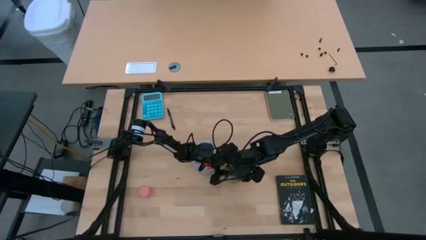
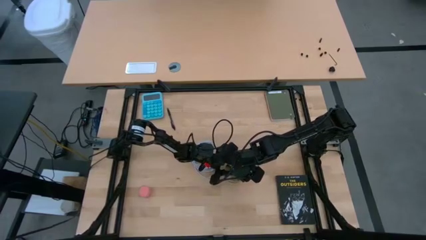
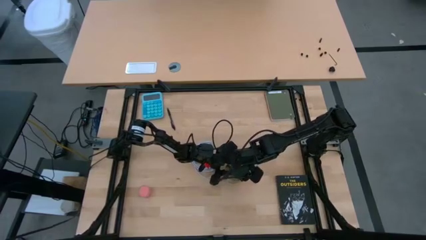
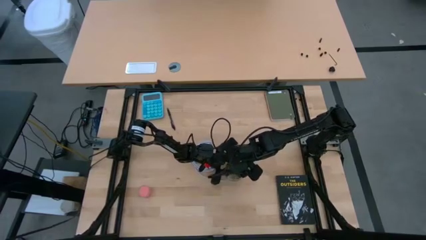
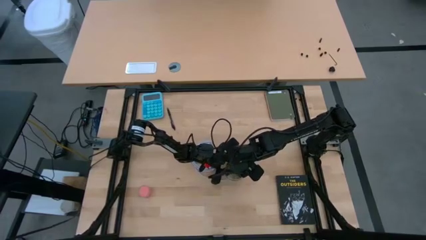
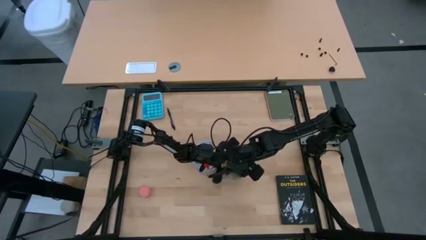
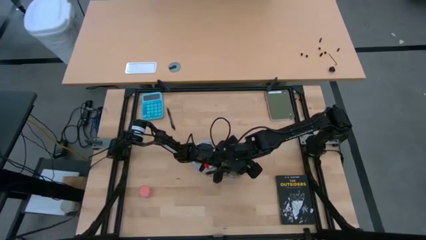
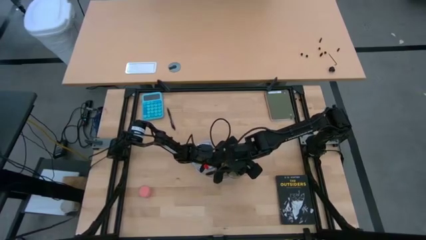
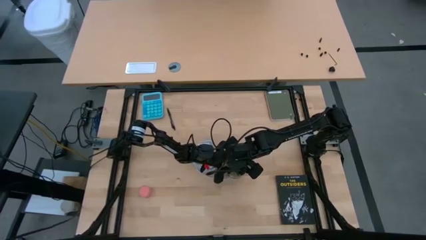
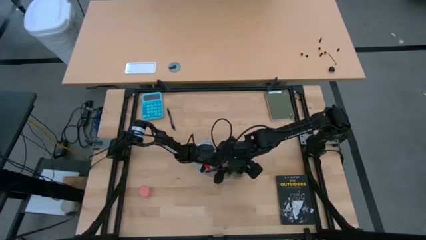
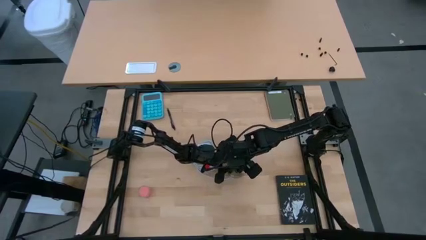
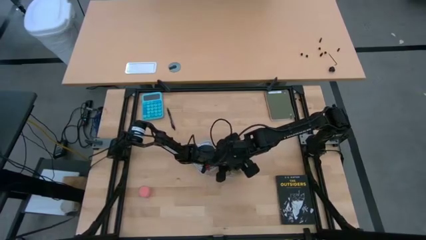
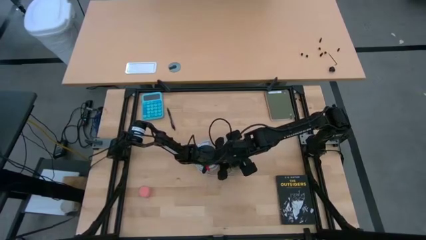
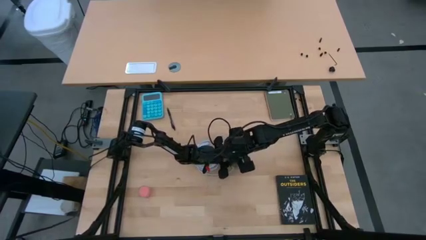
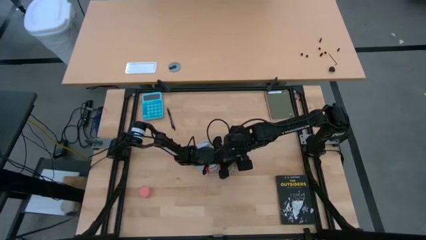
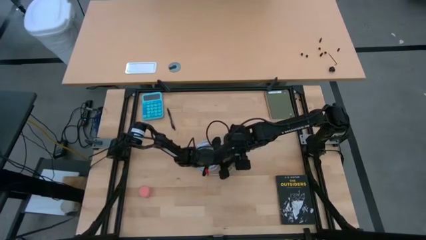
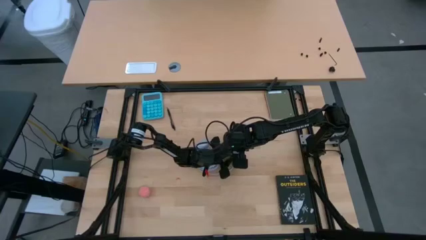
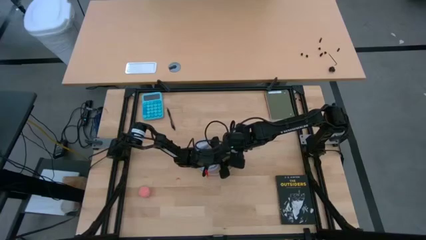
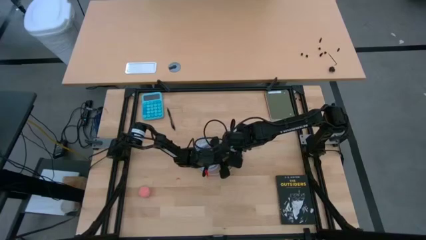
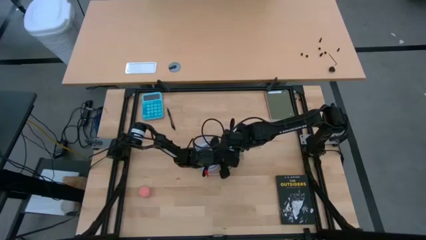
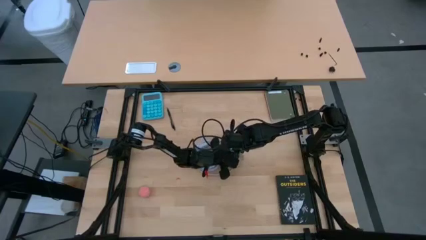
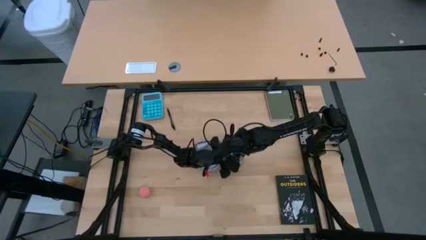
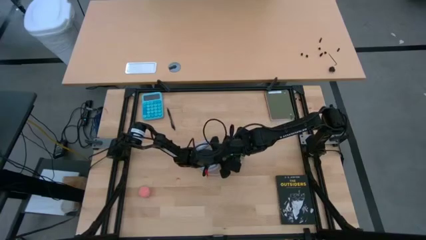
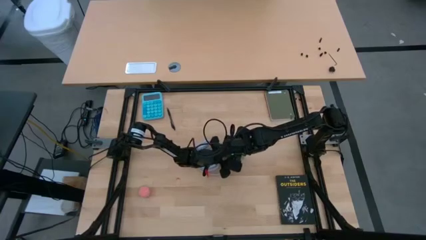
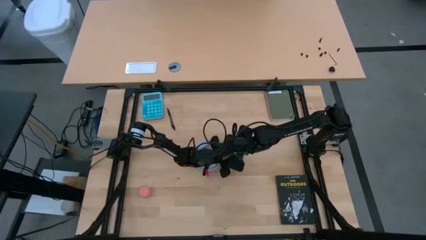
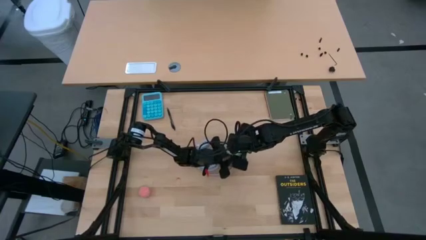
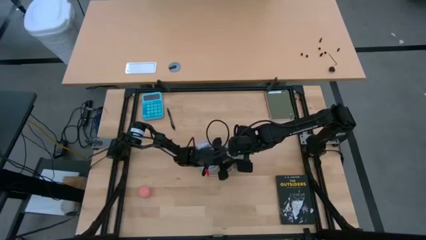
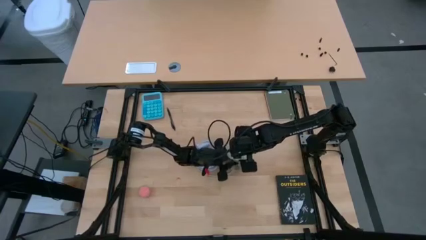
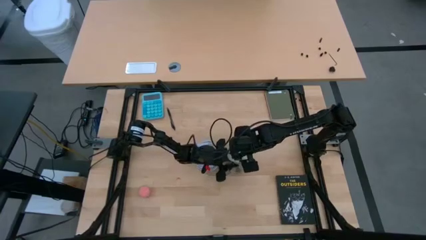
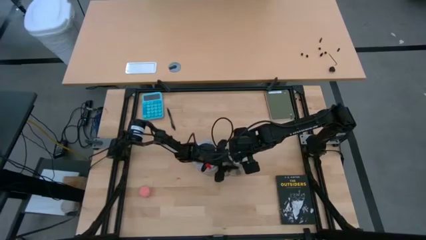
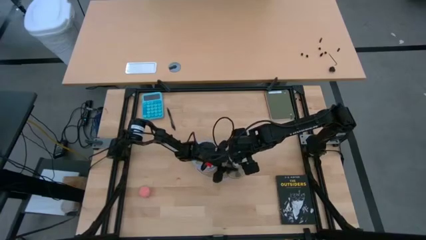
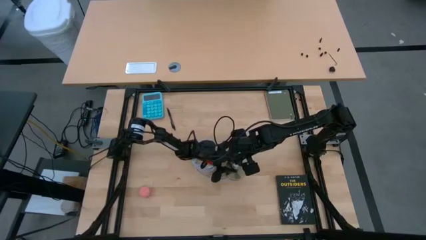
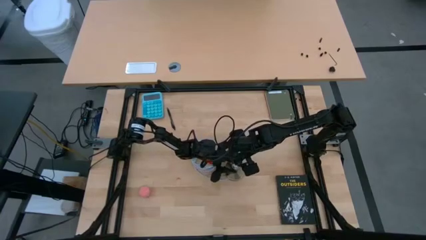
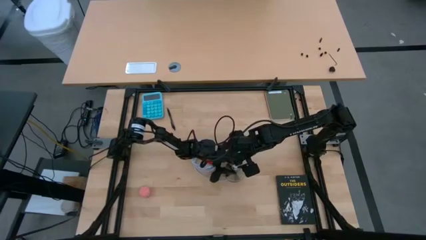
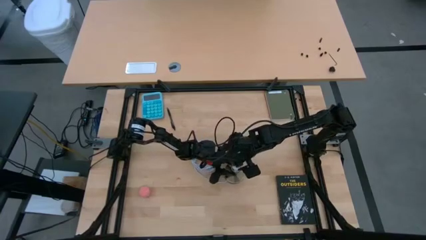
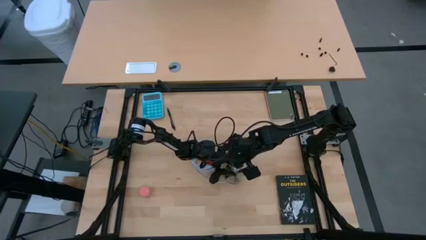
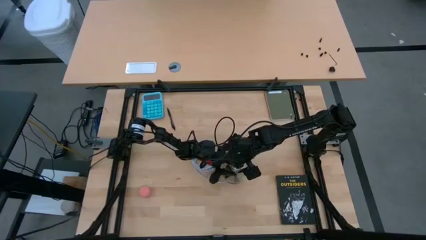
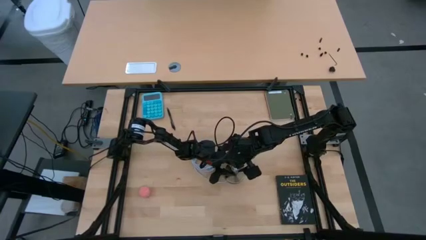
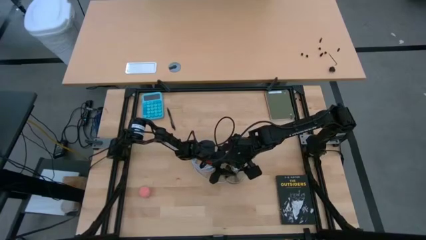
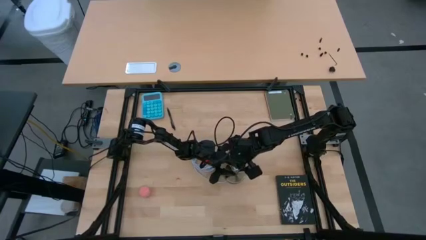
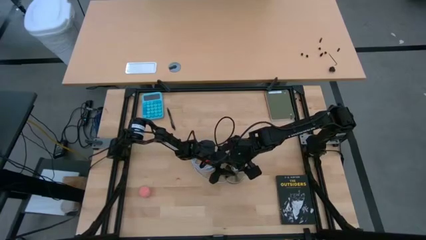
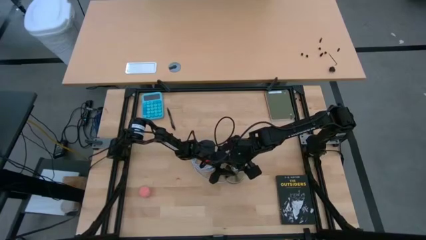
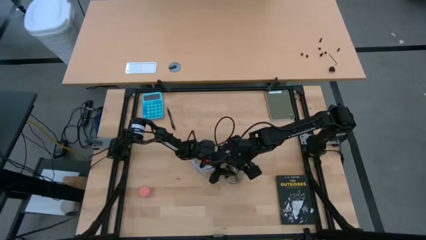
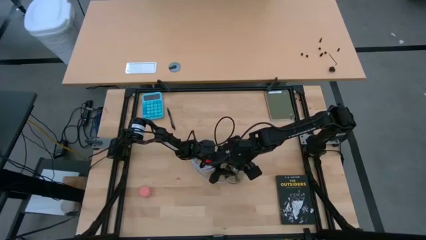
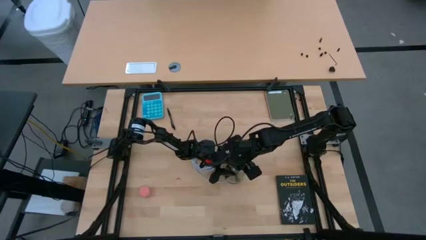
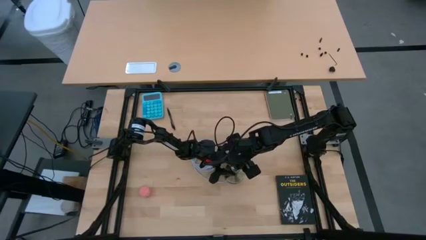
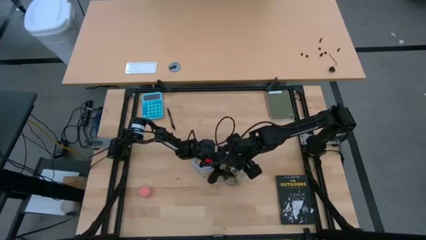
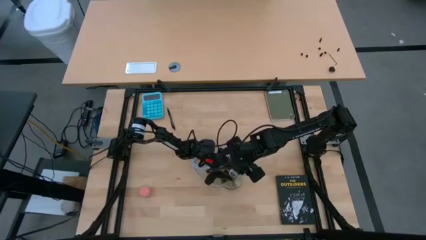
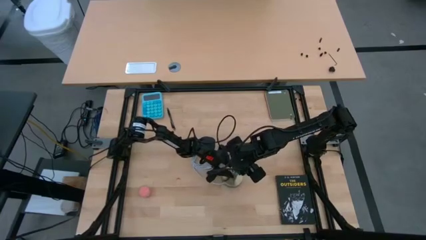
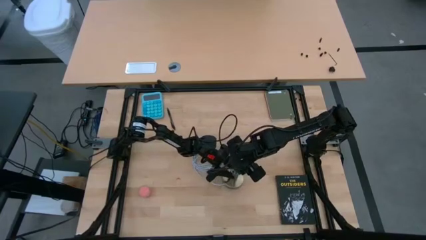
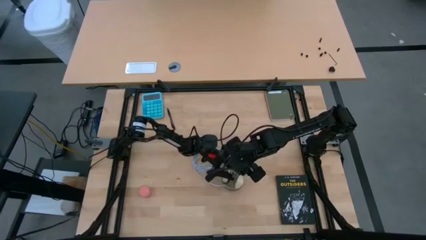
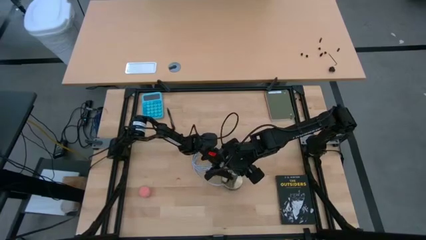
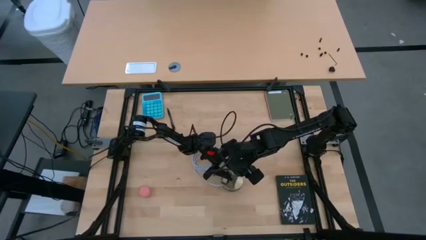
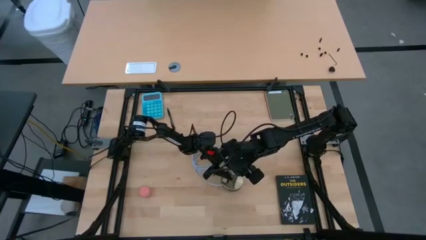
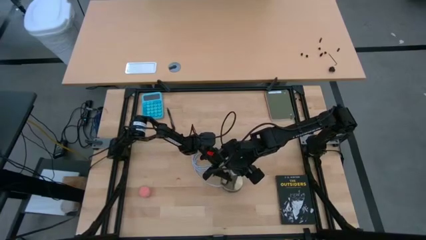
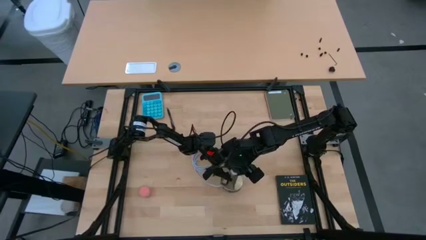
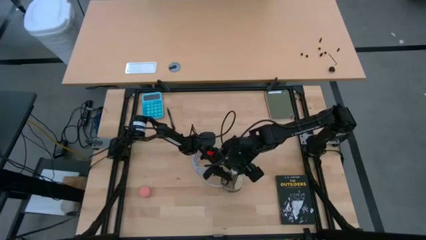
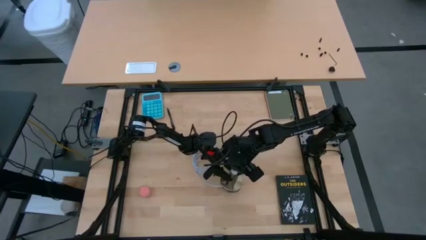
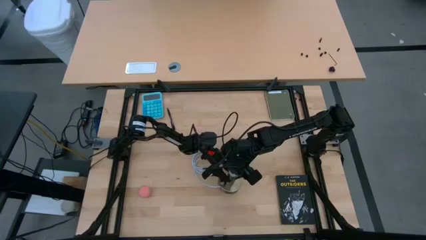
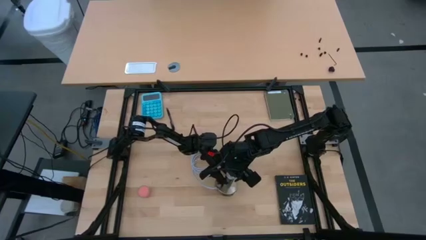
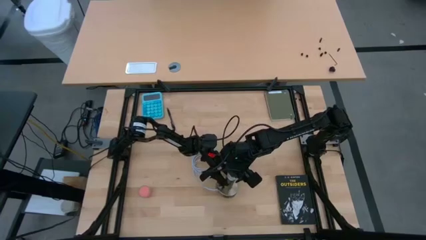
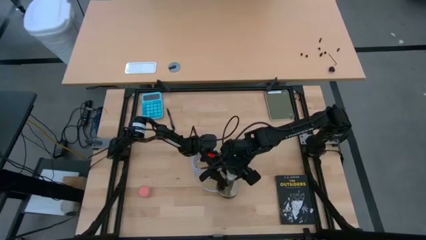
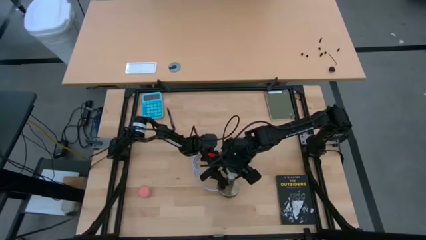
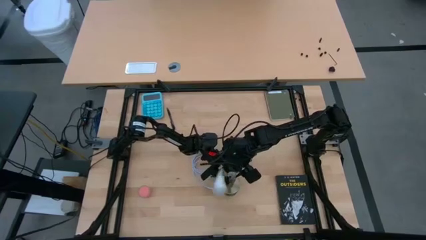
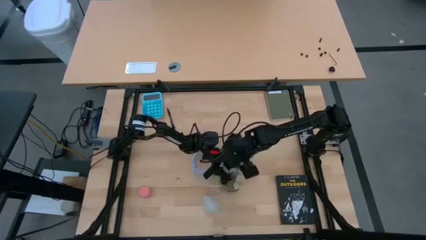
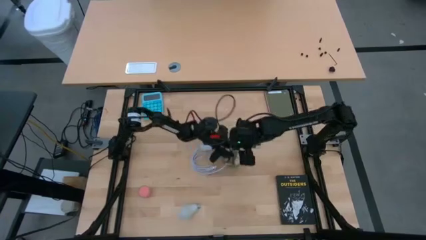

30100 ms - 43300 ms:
Task: Screw lightbulb
Insert the white lightbulb into the desk lamp

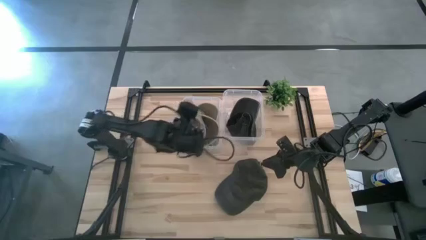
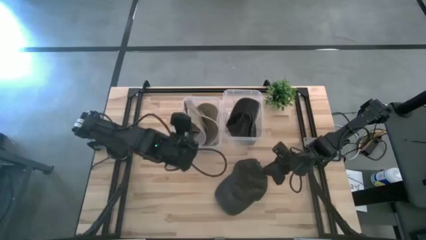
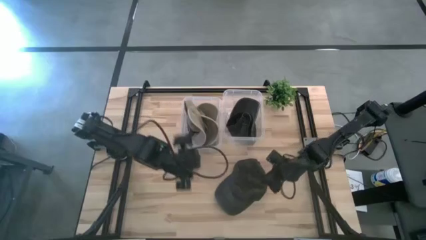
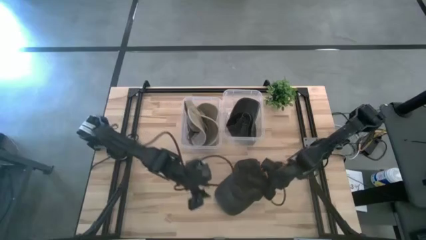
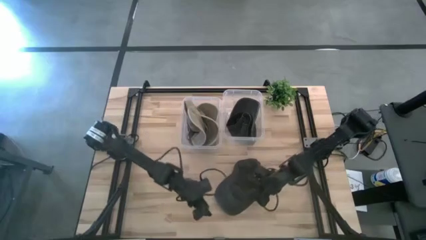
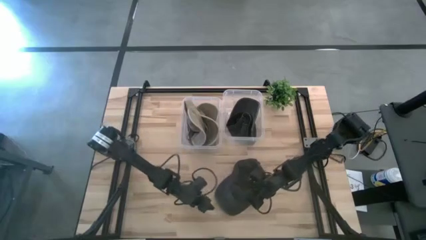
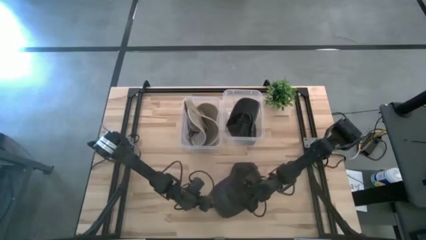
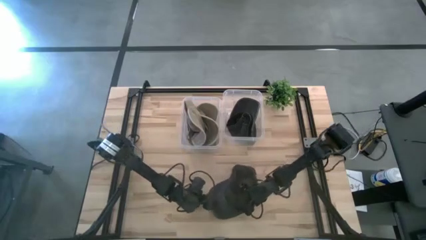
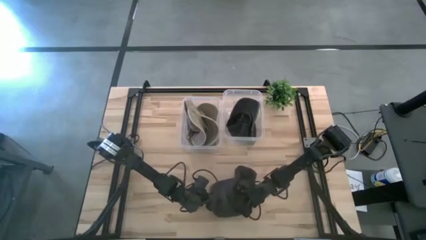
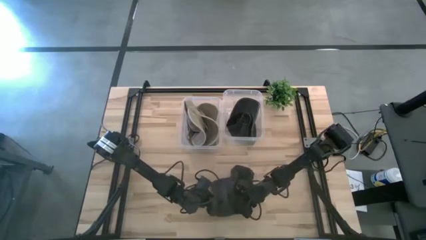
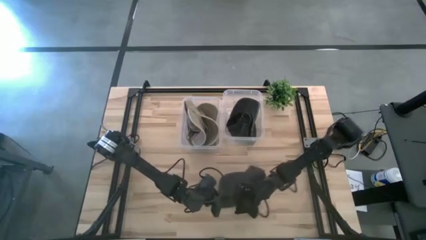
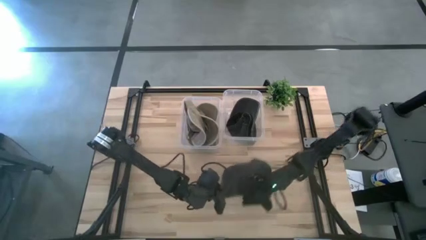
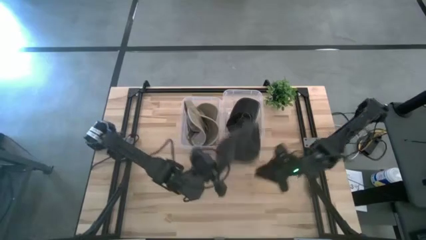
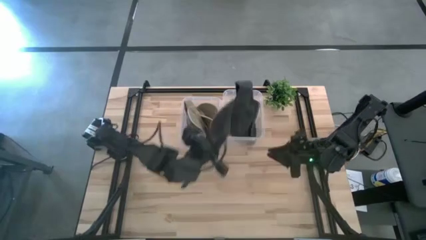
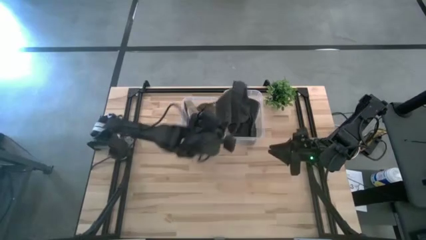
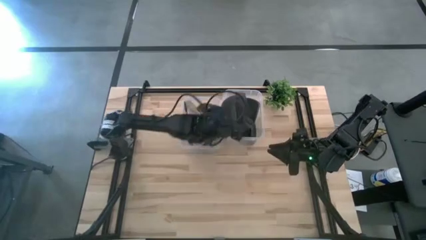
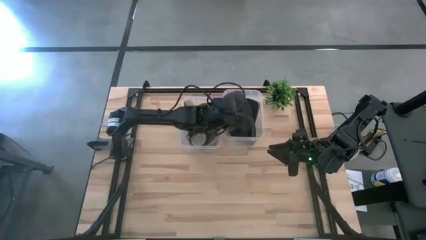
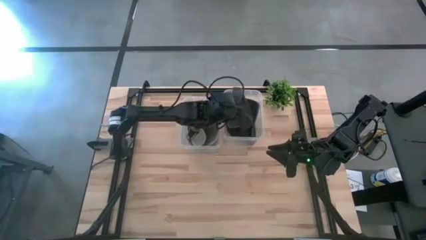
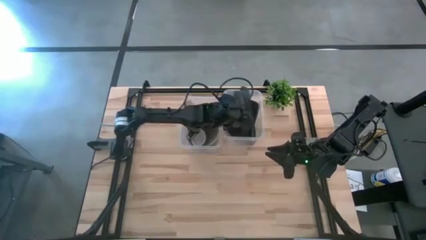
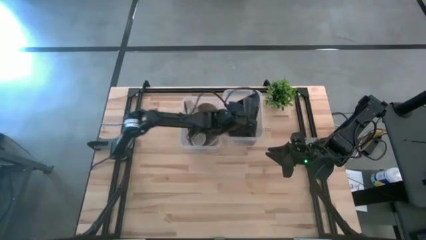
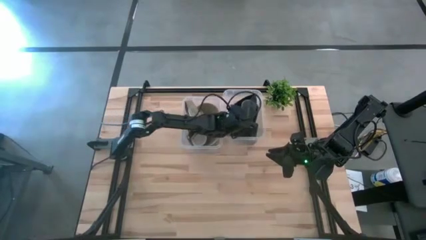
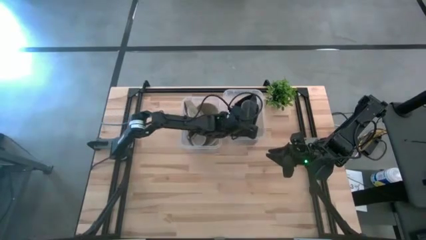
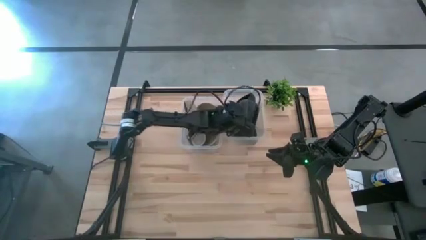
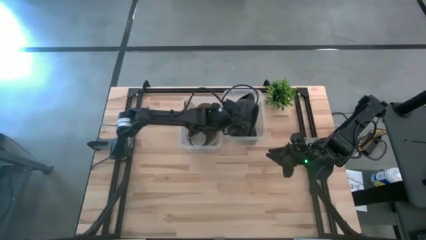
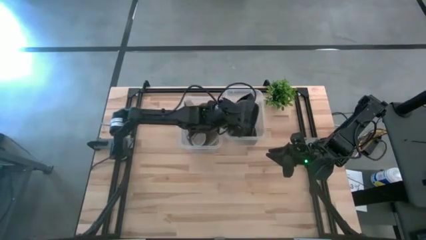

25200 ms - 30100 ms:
Task: Pick & Place hat
Put the black cap into the right transparent bin
